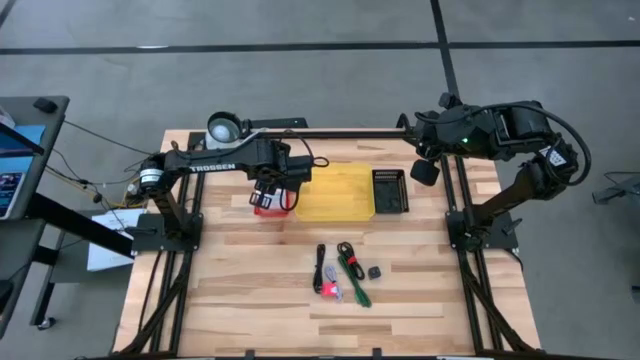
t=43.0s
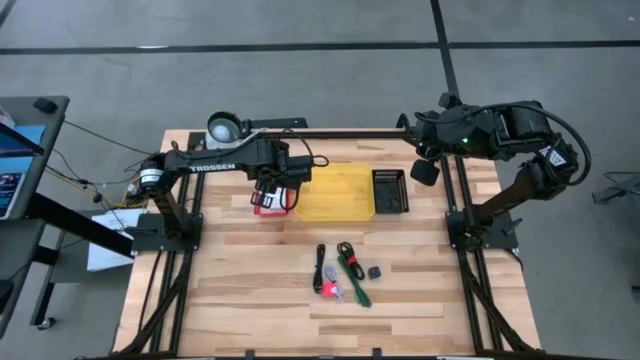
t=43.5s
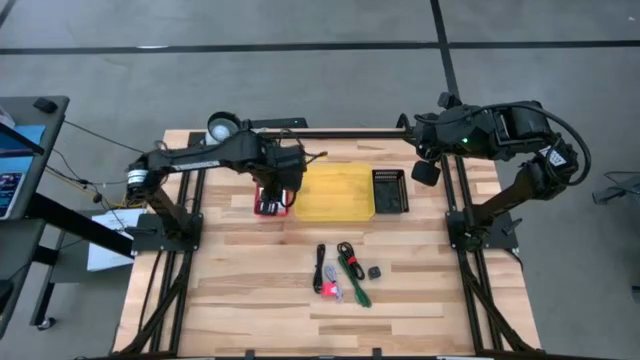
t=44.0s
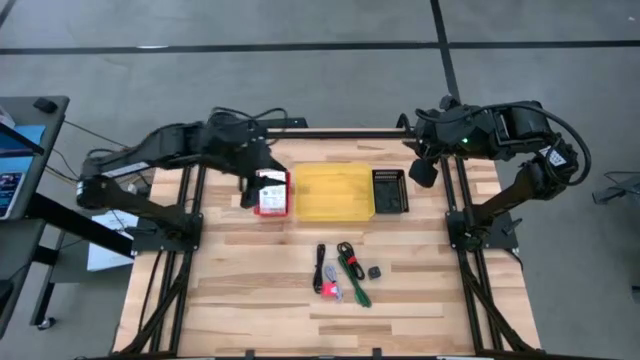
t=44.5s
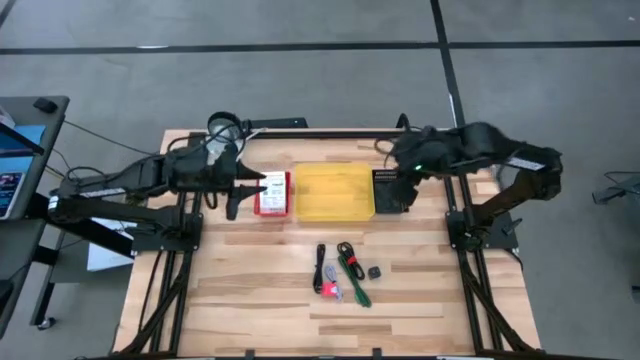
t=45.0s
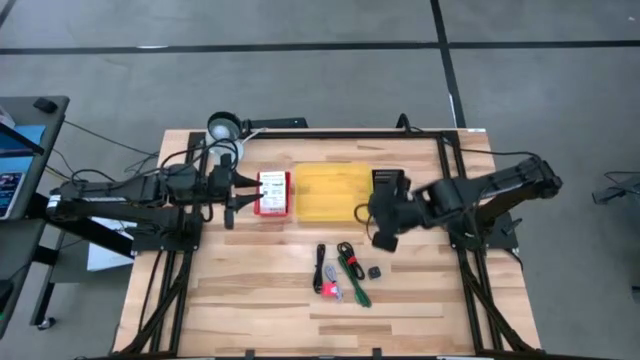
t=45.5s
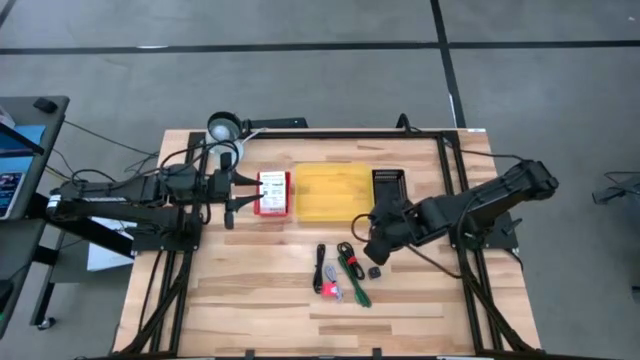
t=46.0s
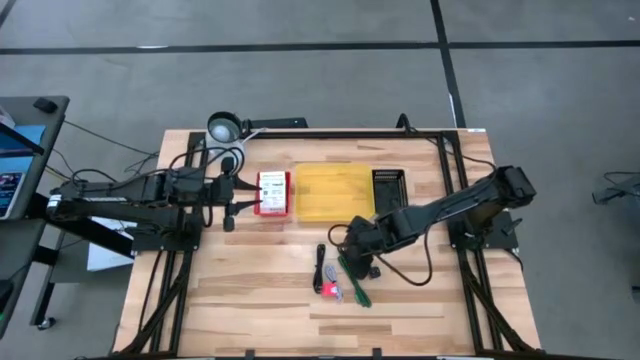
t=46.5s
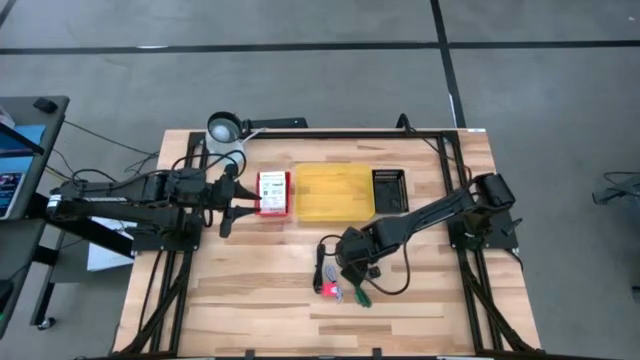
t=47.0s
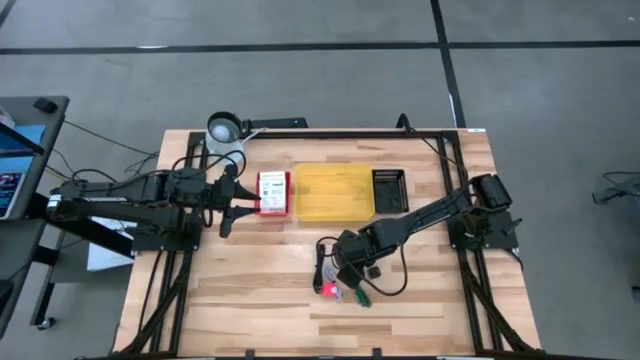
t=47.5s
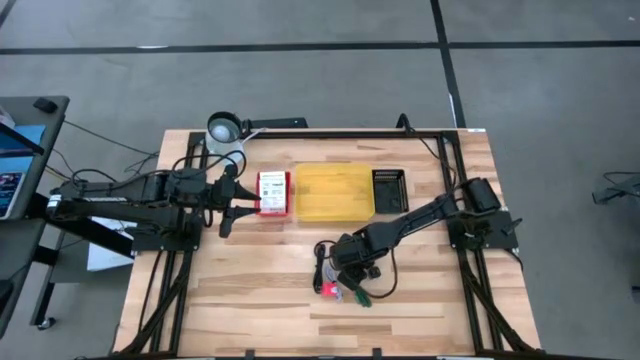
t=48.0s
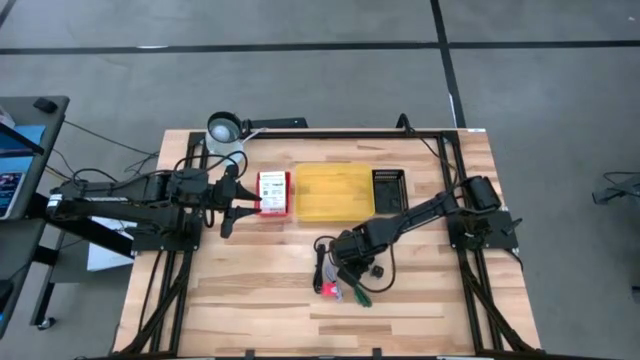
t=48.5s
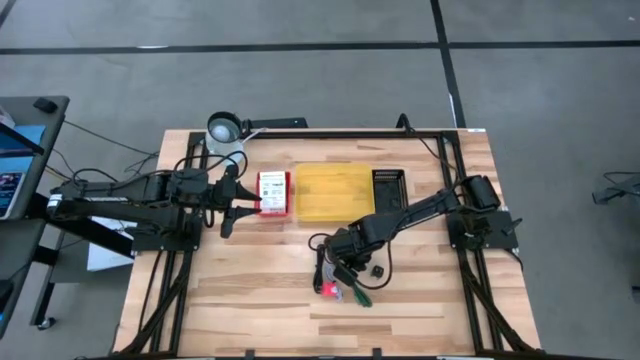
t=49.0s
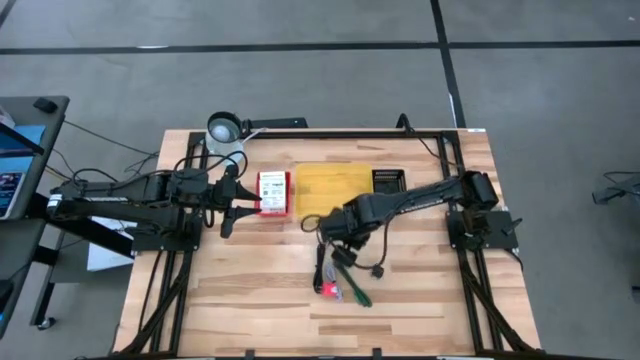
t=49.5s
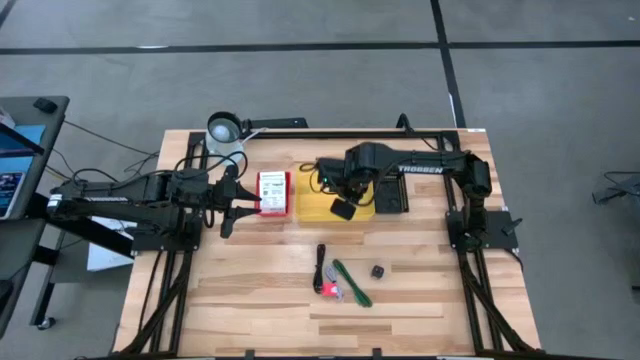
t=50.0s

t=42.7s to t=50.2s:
Task: Pick and place items into bin
Put the black and red charger cable into the yellow bin

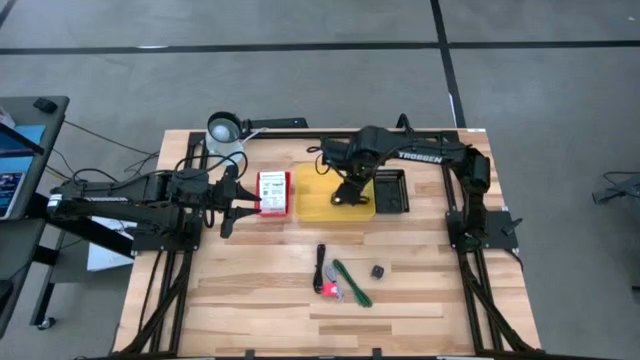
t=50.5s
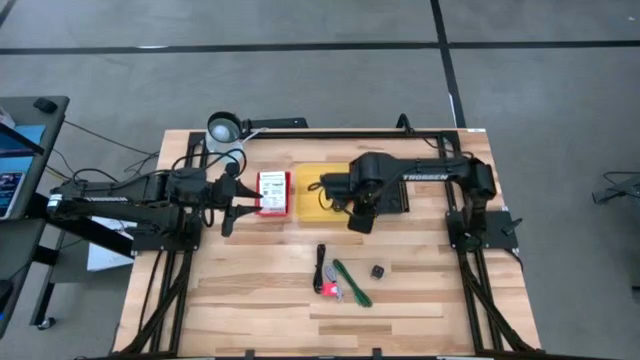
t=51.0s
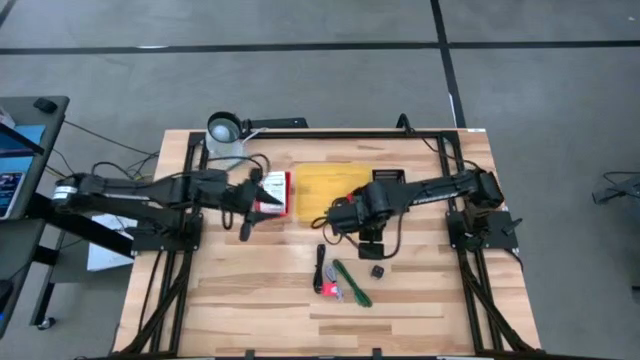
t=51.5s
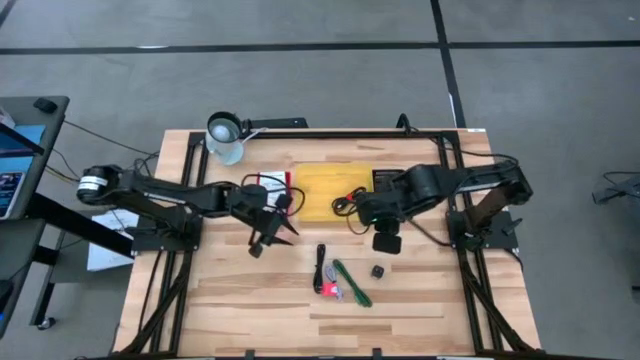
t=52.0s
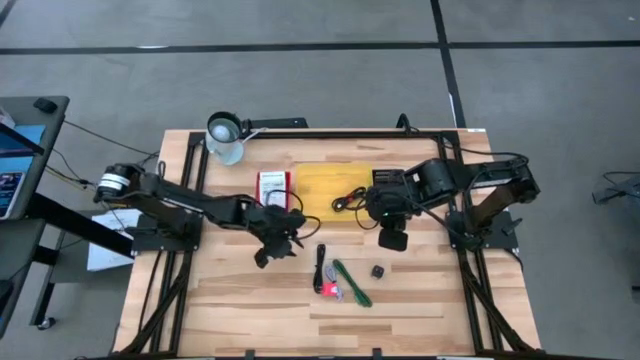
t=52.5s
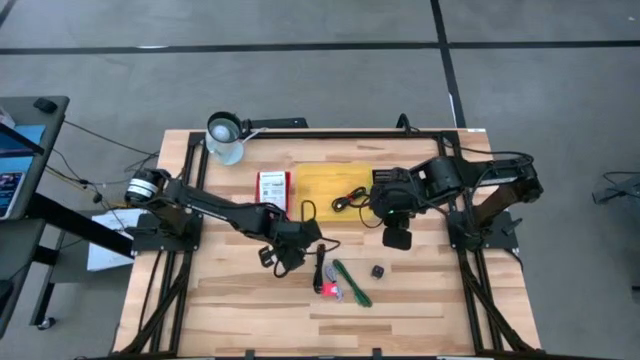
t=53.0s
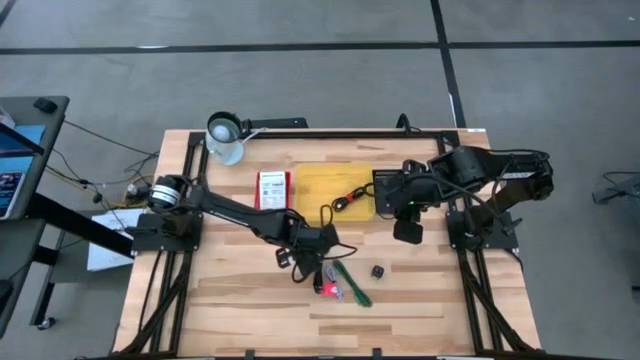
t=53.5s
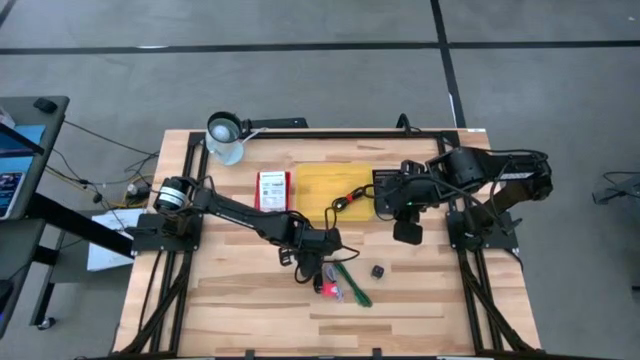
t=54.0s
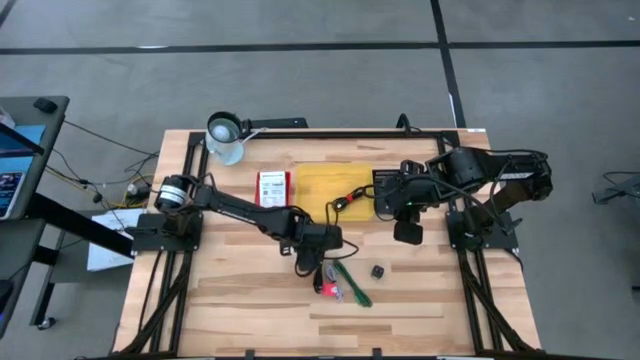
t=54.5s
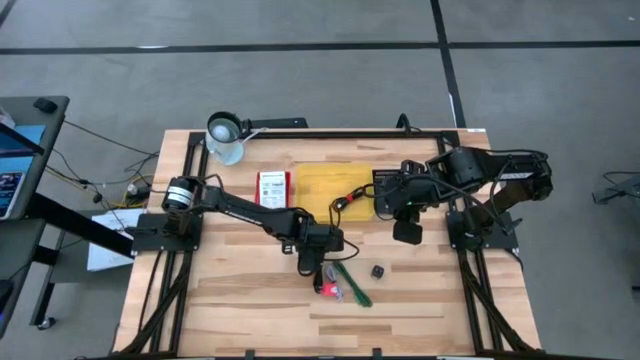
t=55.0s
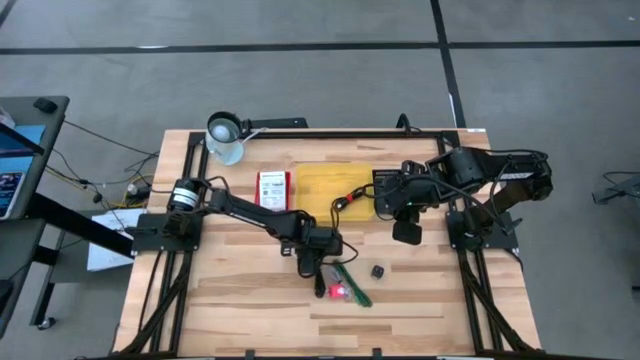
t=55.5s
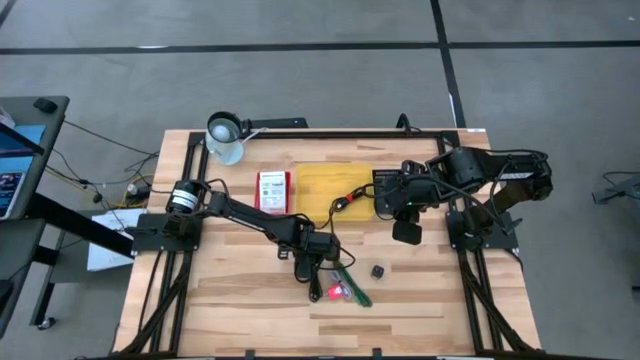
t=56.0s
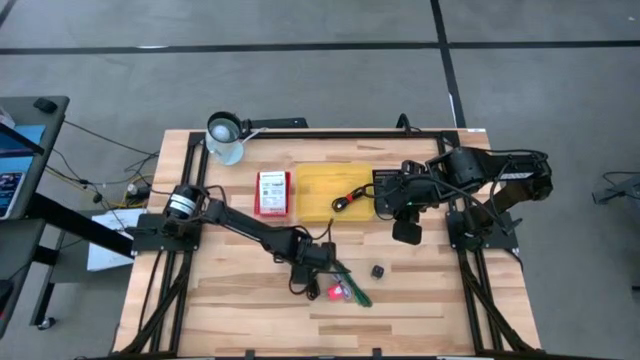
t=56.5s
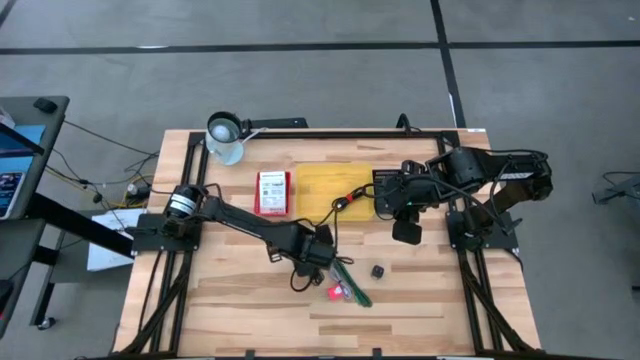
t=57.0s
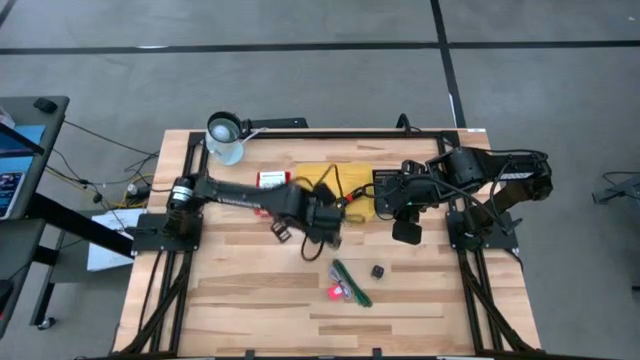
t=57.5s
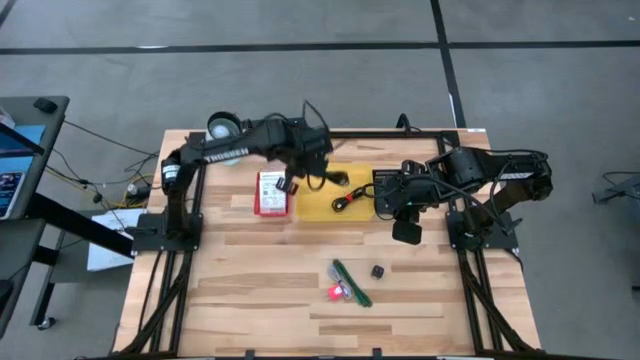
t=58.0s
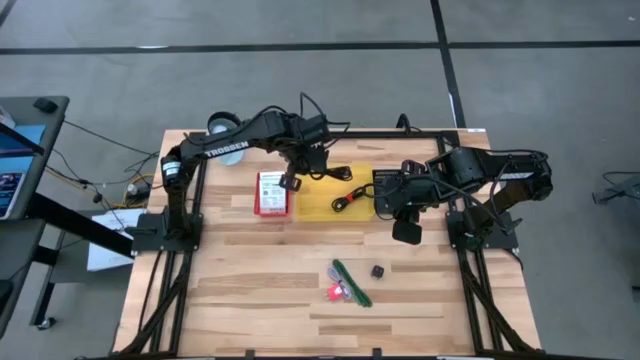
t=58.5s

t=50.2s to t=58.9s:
Put the black charger cable into the yellow bin

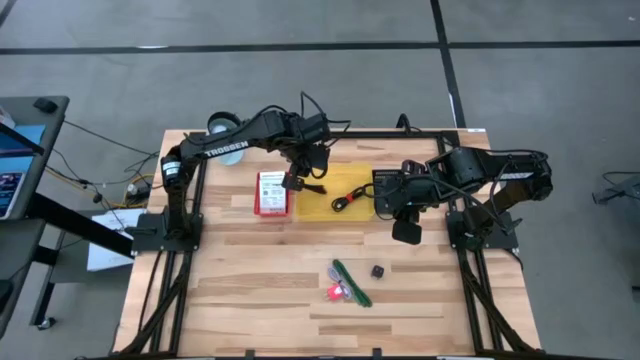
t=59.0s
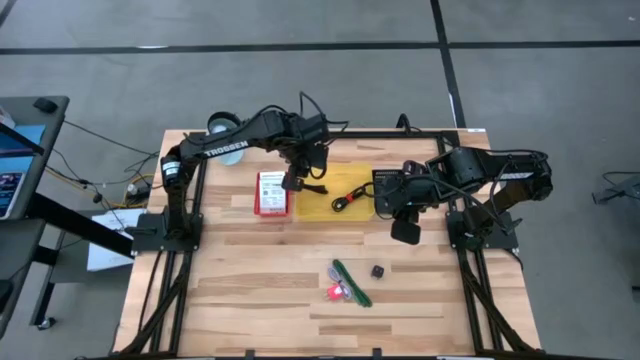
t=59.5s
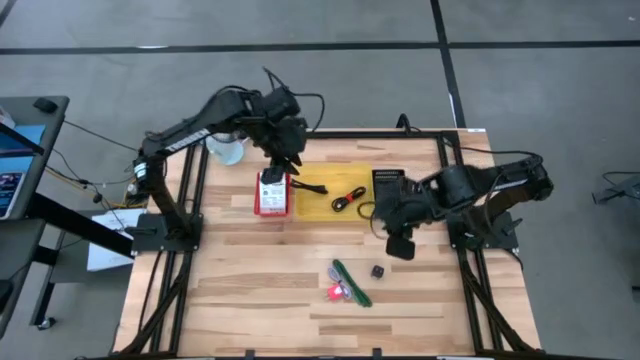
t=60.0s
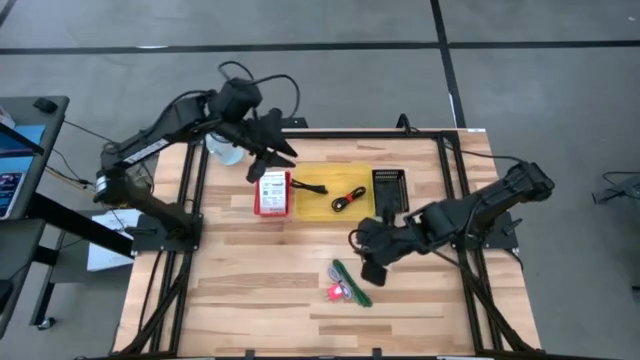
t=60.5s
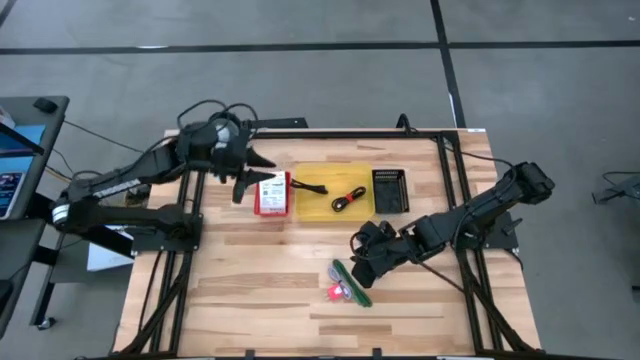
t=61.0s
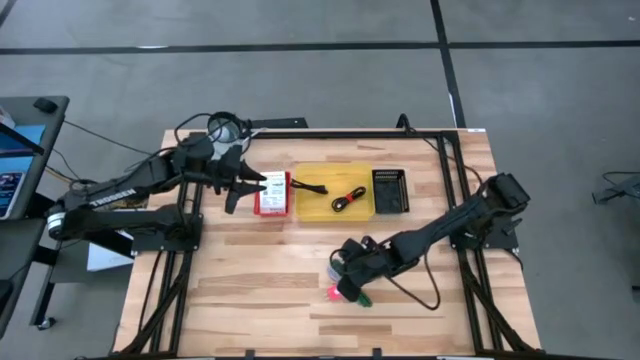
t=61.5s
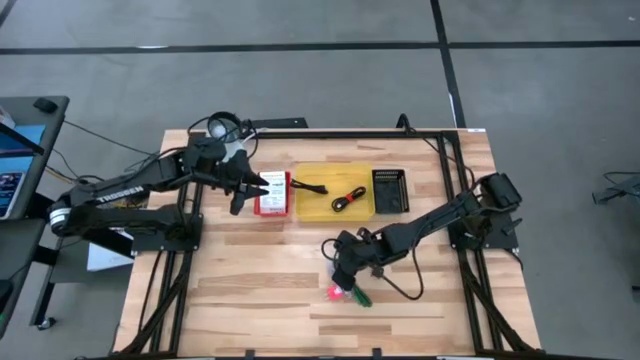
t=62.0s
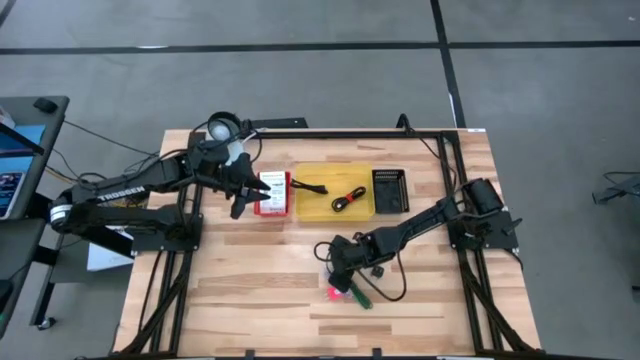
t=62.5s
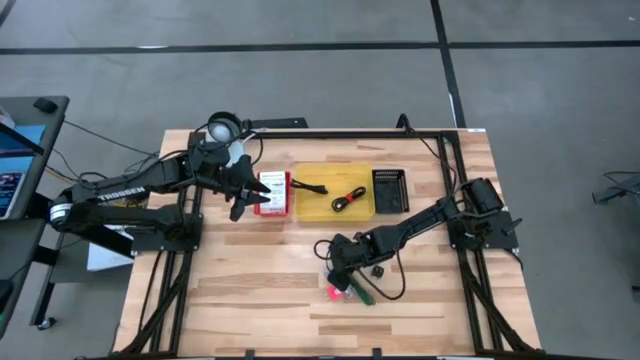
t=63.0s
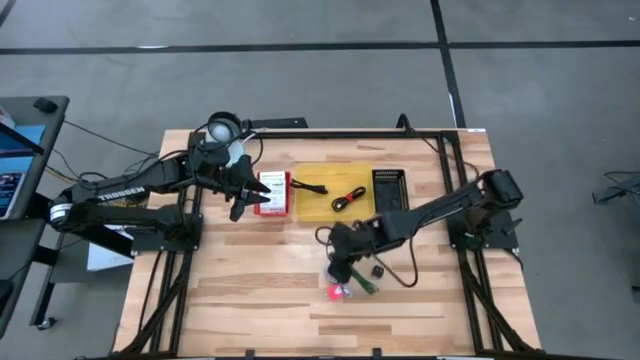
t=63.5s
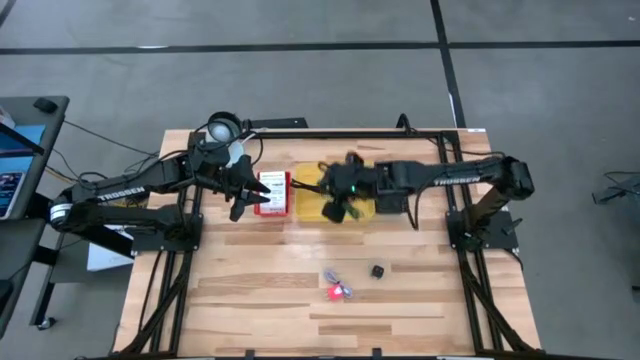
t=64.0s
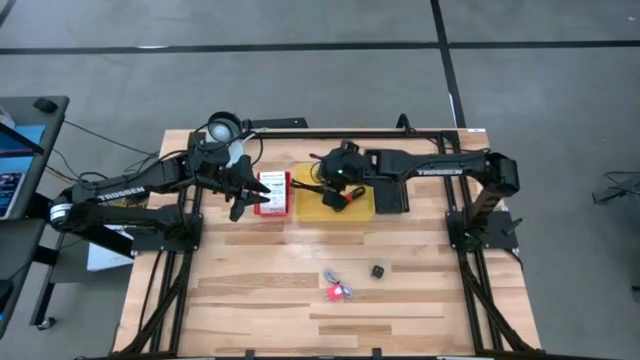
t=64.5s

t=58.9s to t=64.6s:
Put the green charger cable into the yellow bin
